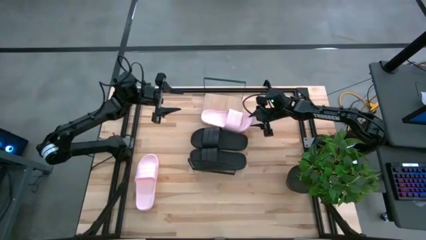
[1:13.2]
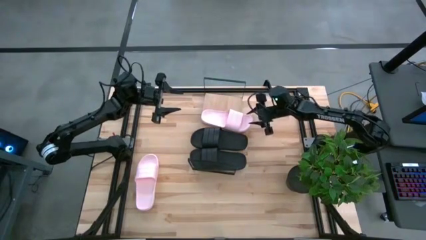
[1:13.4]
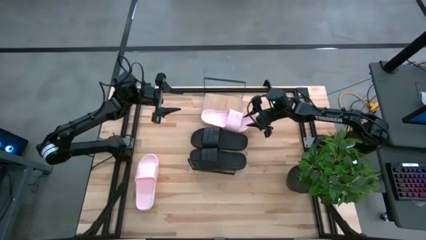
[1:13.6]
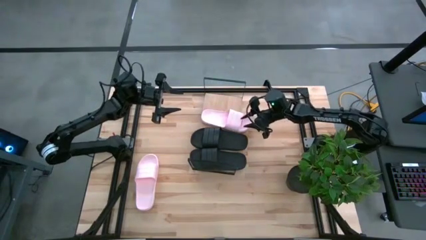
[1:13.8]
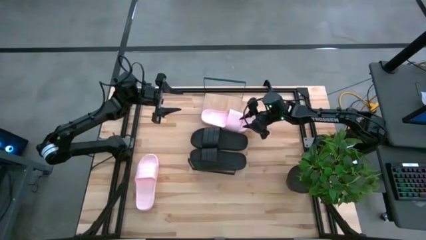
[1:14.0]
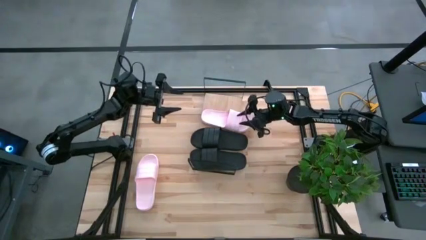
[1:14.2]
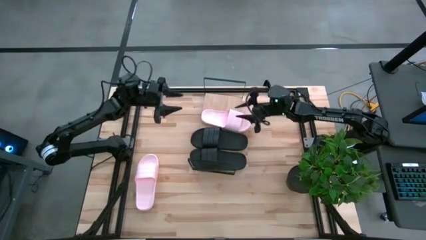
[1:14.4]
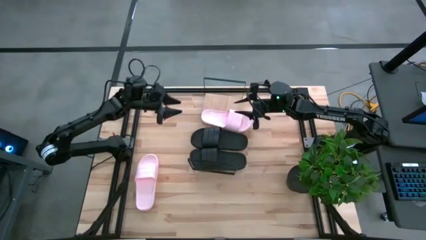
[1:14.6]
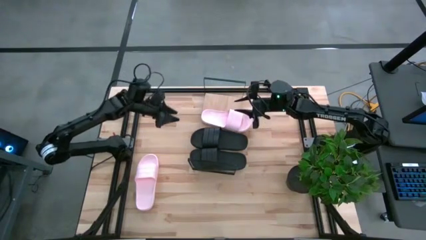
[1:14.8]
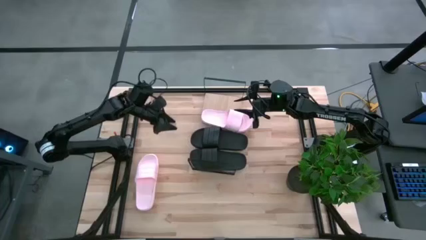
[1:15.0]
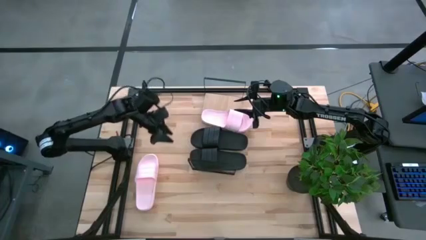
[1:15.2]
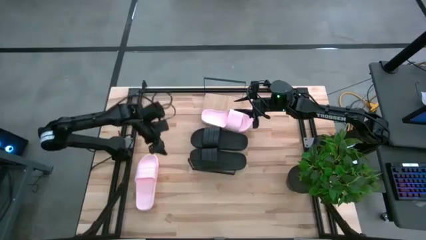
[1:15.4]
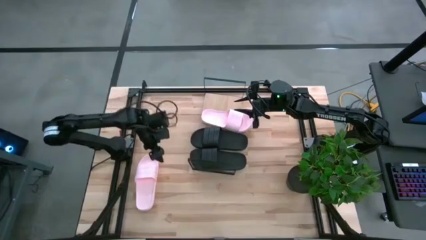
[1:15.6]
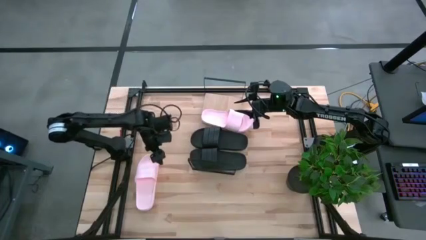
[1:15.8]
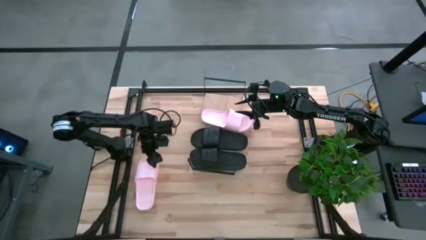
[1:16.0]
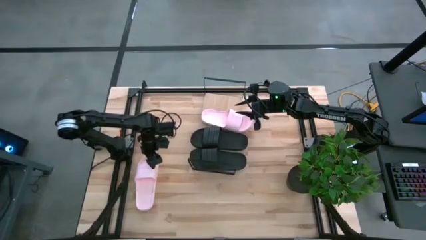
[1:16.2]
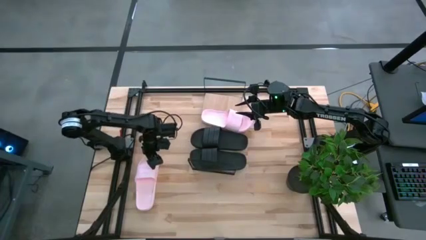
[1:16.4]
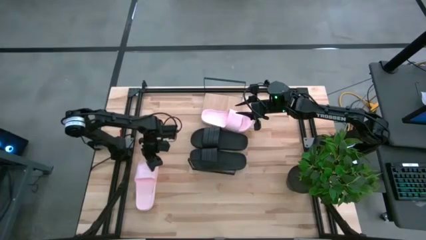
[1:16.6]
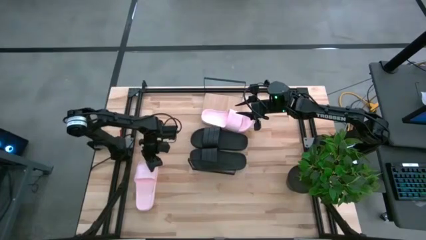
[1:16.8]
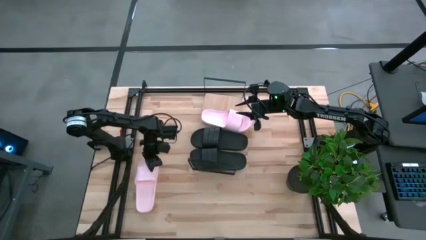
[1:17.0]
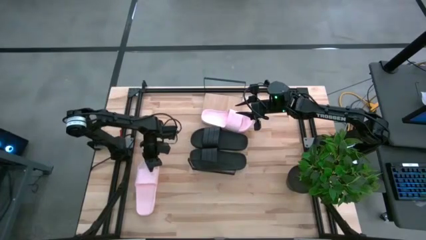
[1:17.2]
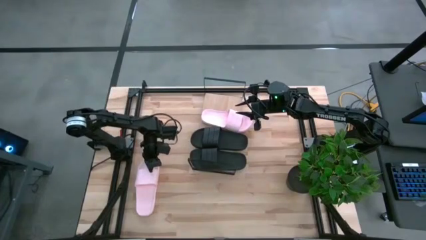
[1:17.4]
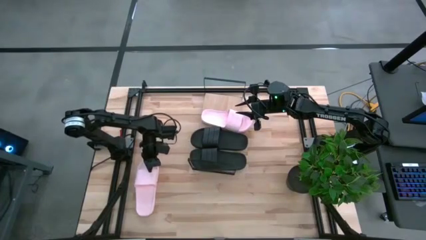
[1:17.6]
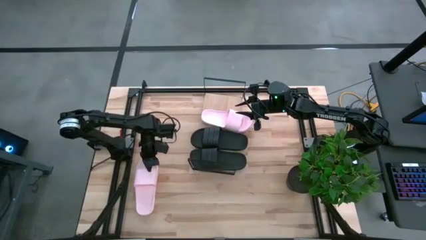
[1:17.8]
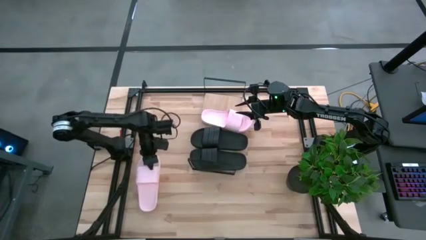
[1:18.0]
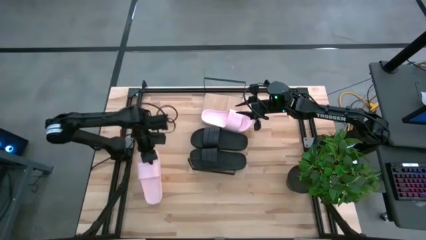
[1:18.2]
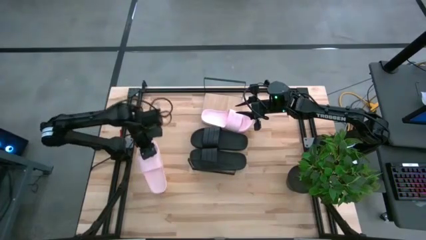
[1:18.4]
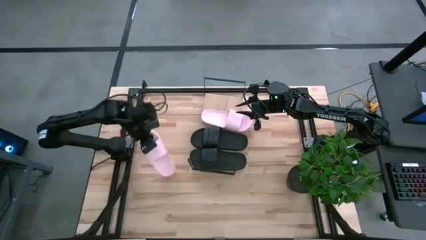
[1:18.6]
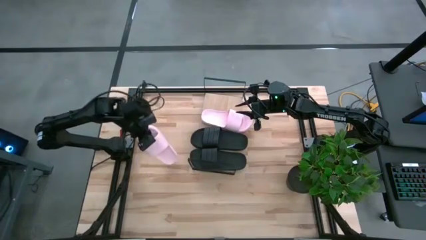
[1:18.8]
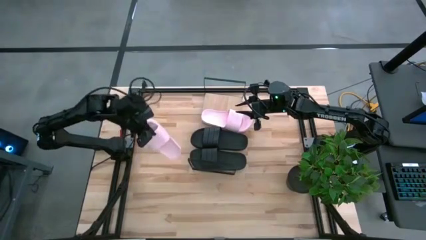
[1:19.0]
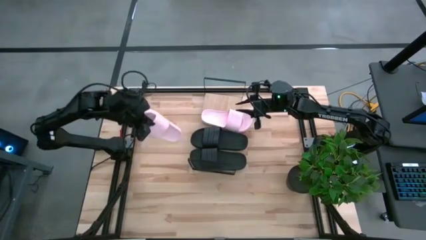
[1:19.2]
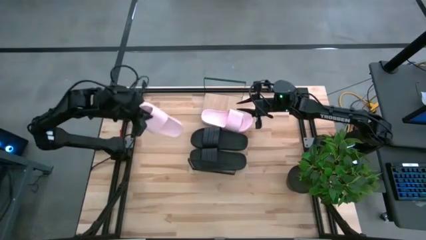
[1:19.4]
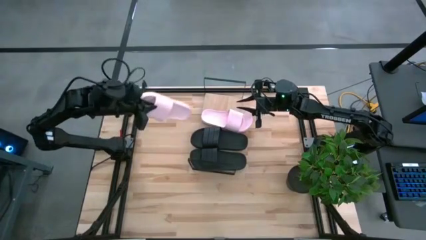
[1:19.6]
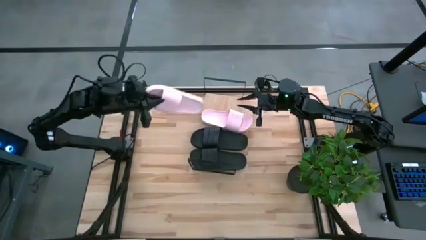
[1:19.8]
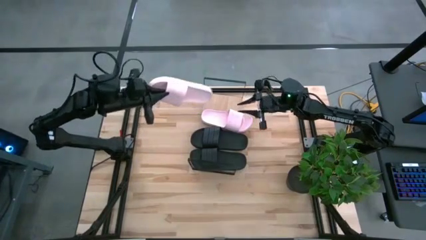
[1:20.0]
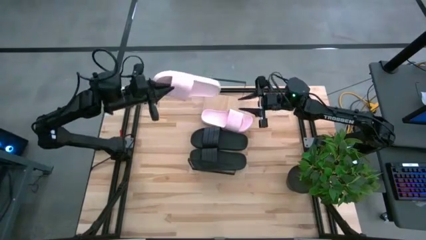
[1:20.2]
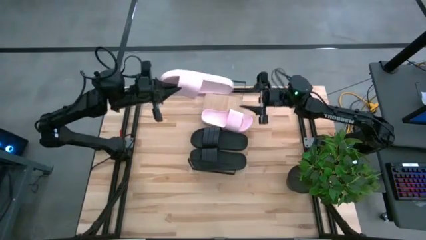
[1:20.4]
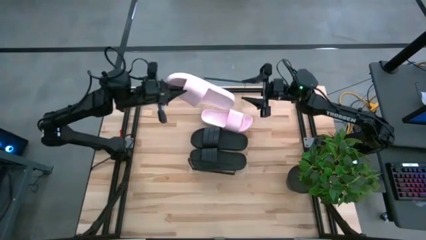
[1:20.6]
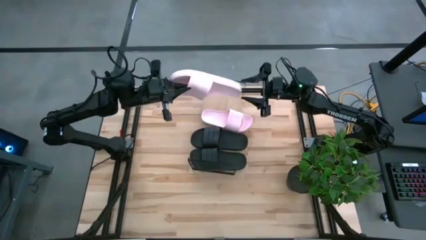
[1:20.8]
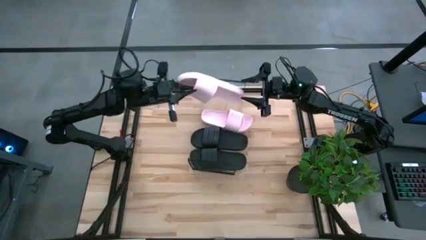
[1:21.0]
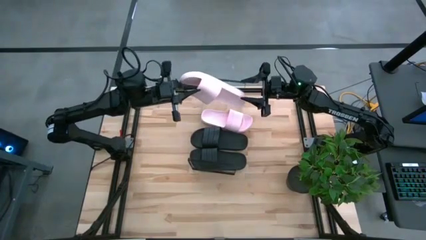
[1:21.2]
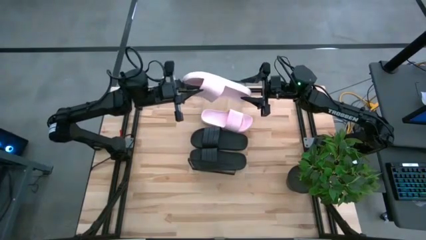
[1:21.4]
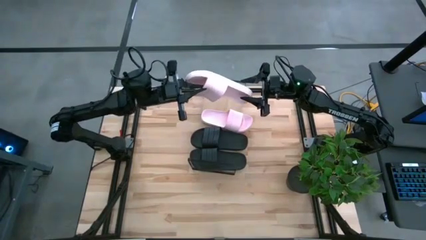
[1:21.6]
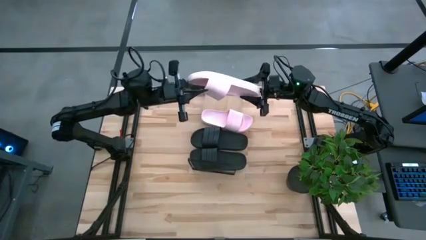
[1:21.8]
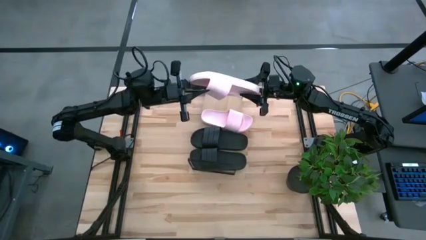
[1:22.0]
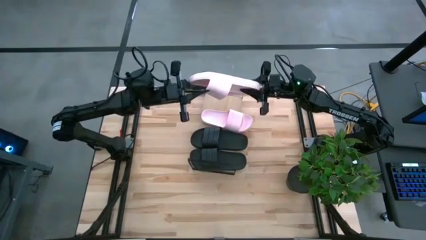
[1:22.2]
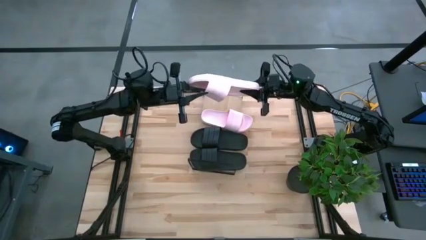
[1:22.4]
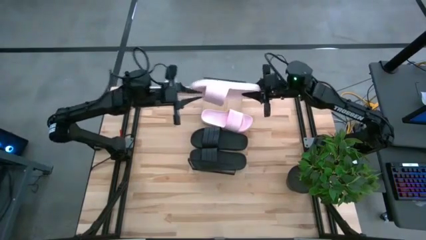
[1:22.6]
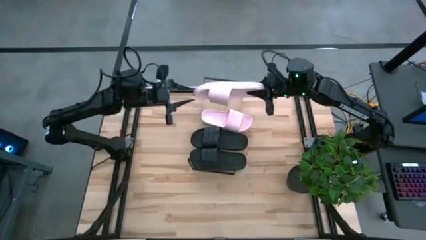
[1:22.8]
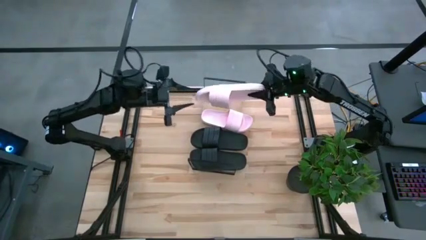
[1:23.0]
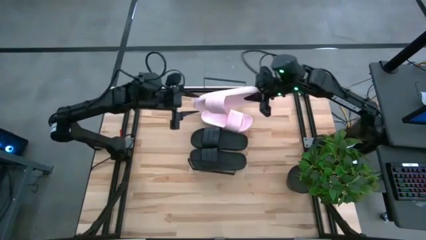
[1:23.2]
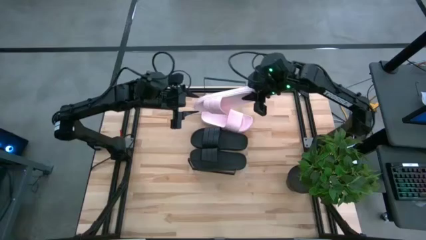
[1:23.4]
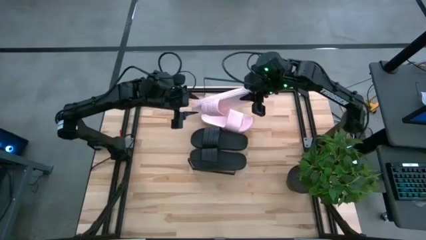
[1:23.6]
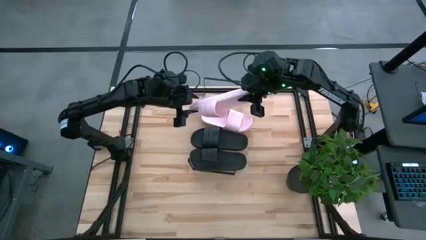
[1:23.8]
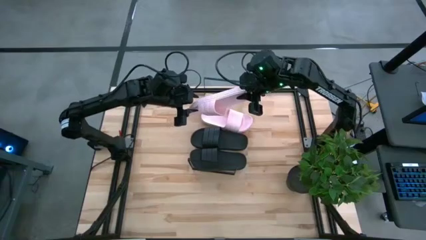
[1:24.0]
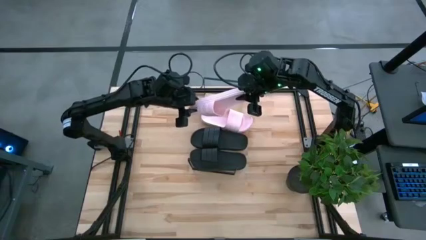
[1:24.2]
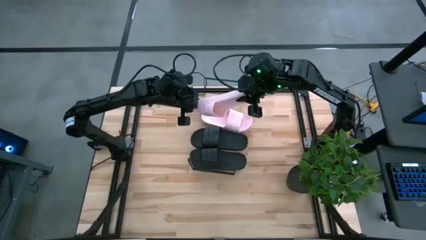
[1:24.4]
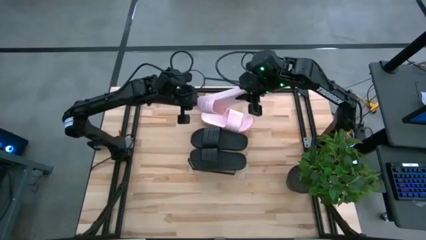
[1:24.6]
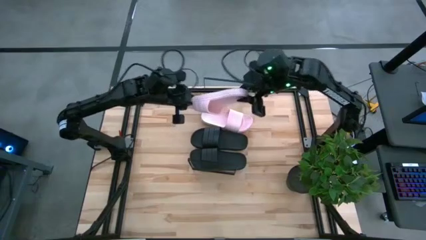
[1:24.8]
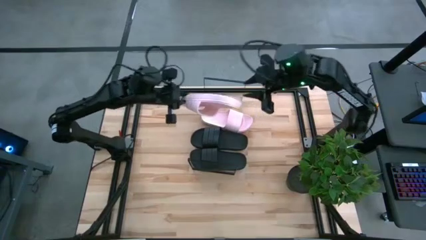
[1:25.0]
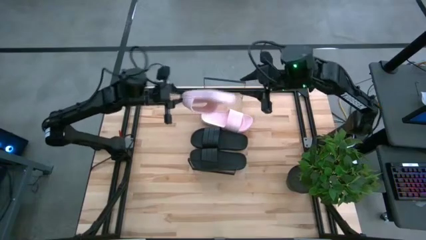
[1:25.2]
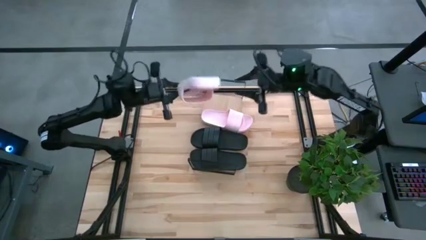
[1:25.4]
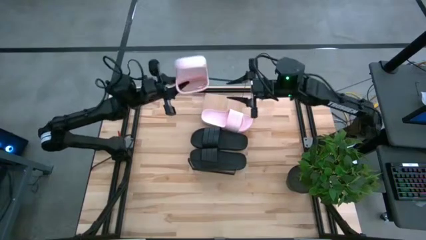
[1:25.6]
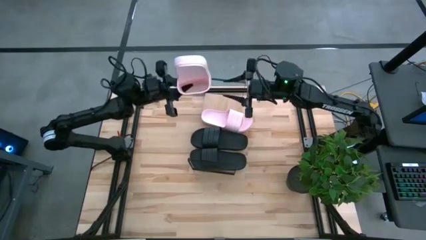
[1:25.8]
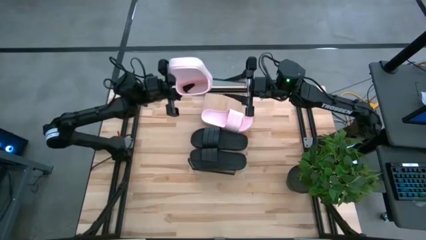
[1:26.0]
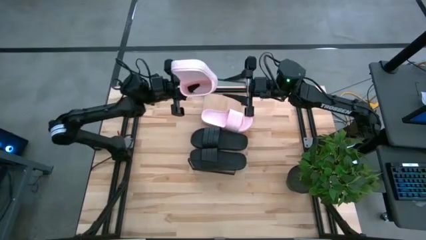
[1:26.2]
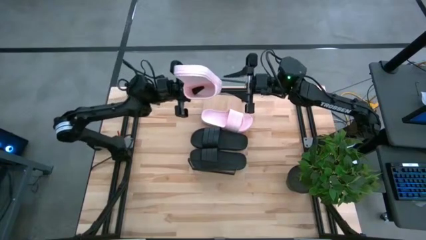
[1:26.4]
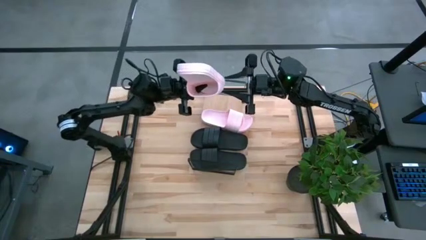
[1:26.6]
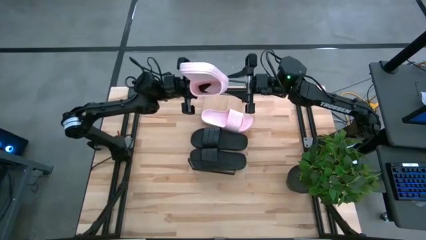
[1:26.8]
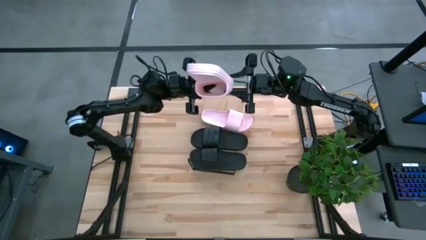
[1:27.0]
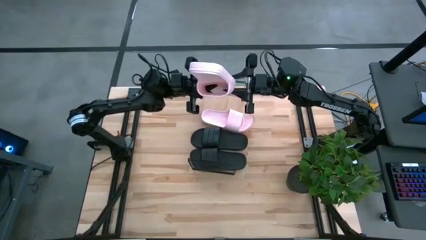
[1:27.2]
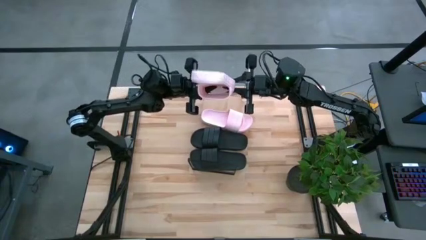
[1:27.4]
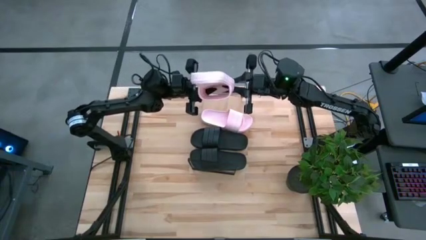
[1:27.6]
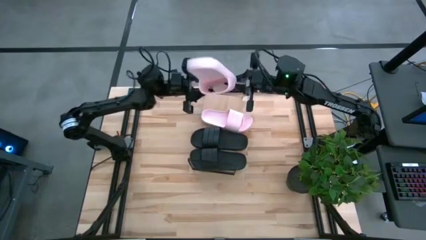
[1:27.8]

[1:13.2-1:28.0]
Task: Pick and place slides into the shelf
Put the pink slides on the shelf
